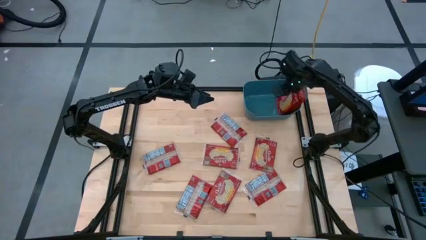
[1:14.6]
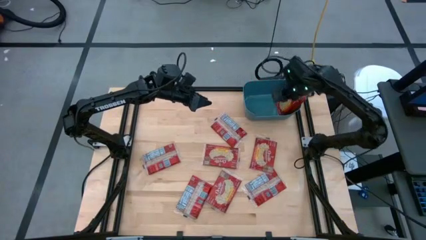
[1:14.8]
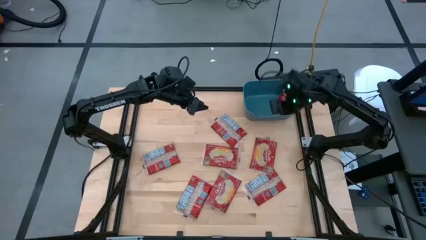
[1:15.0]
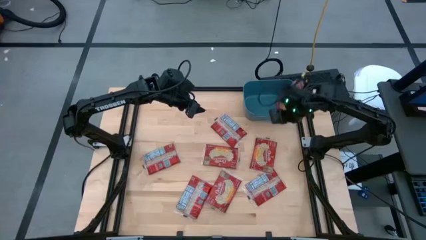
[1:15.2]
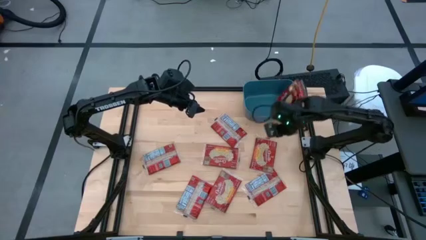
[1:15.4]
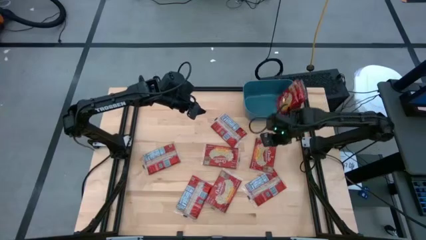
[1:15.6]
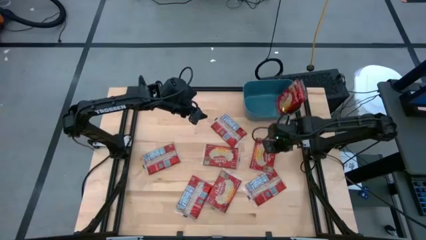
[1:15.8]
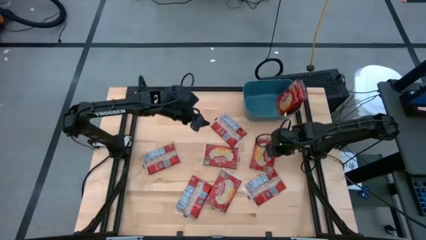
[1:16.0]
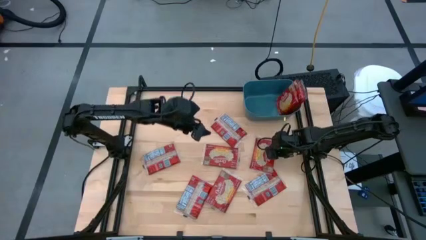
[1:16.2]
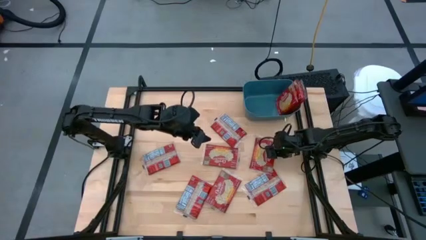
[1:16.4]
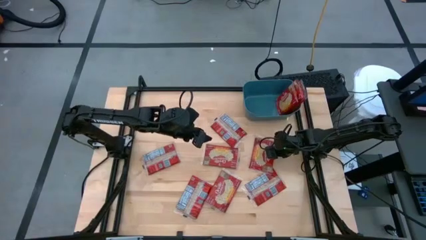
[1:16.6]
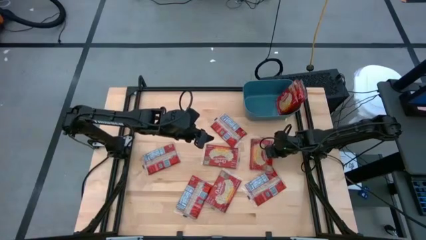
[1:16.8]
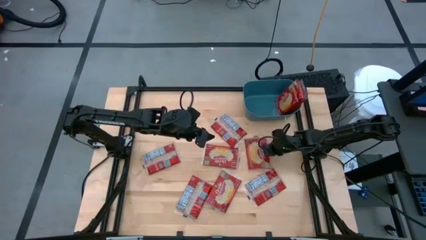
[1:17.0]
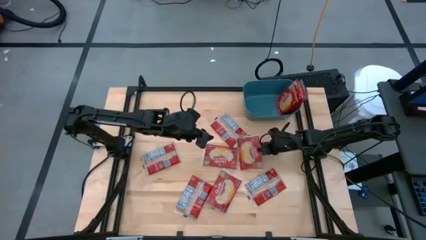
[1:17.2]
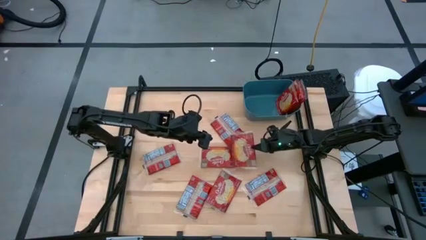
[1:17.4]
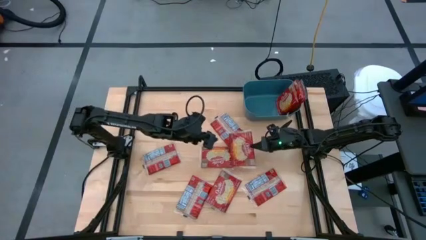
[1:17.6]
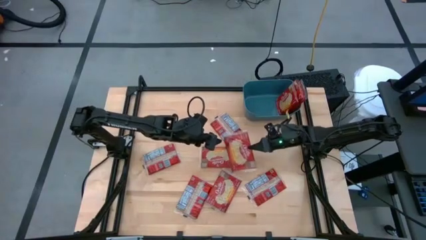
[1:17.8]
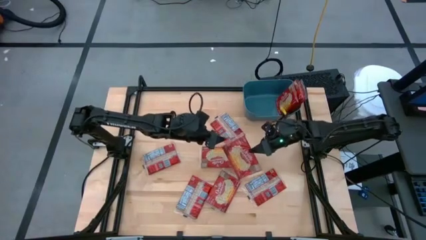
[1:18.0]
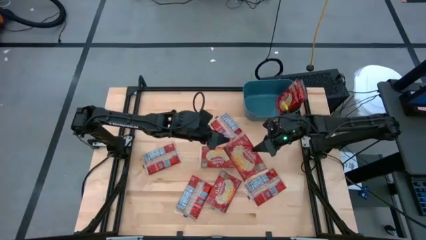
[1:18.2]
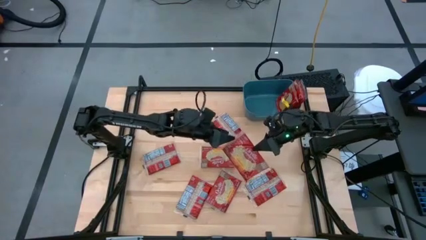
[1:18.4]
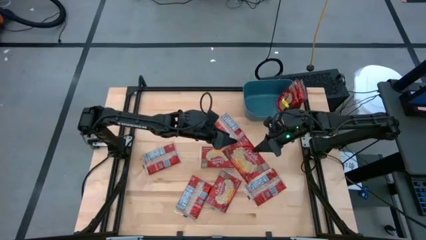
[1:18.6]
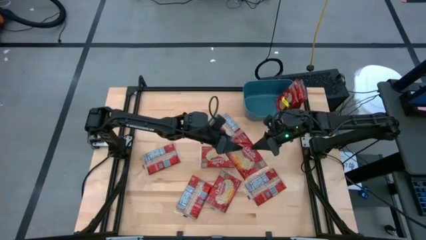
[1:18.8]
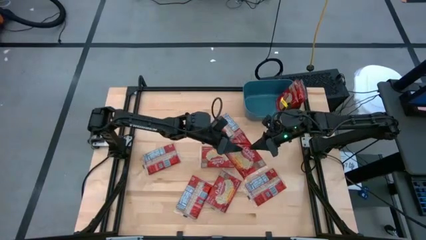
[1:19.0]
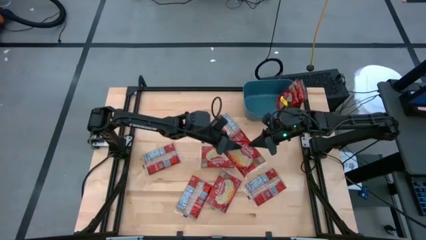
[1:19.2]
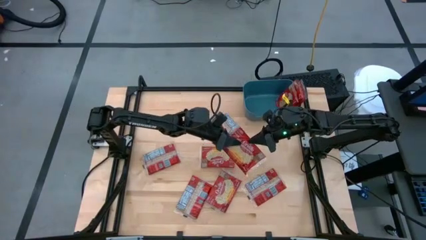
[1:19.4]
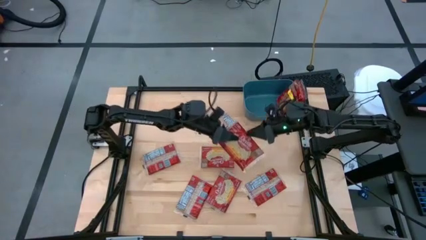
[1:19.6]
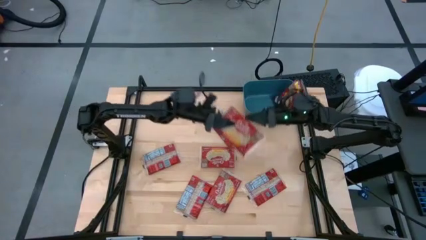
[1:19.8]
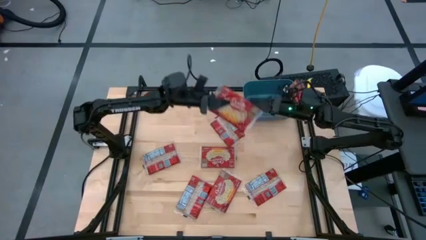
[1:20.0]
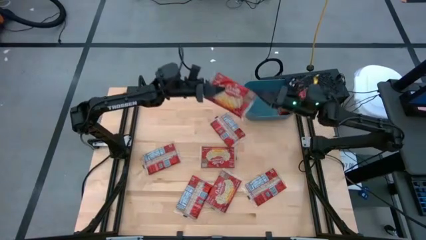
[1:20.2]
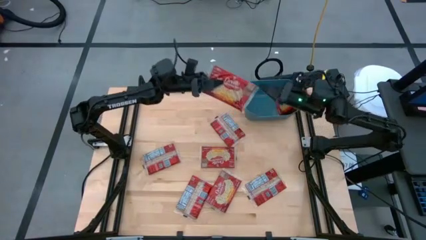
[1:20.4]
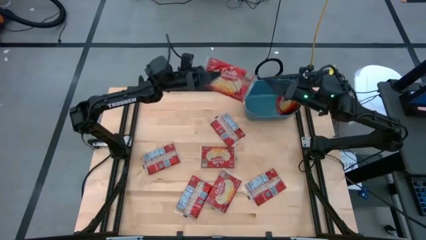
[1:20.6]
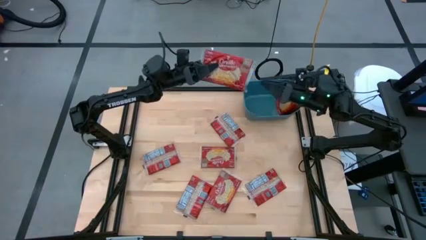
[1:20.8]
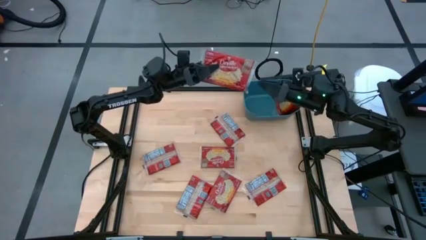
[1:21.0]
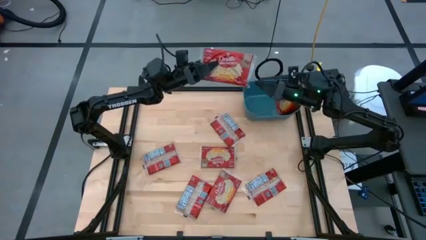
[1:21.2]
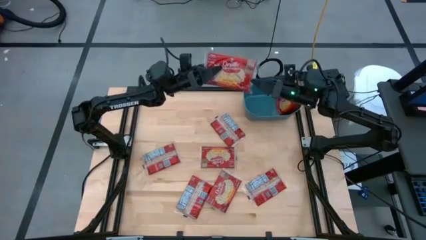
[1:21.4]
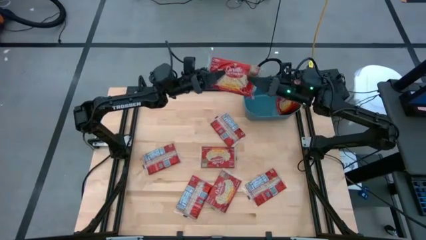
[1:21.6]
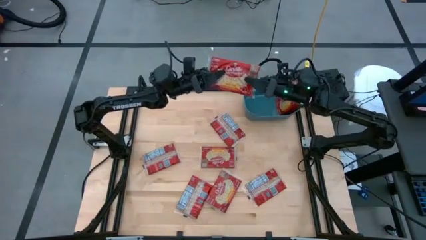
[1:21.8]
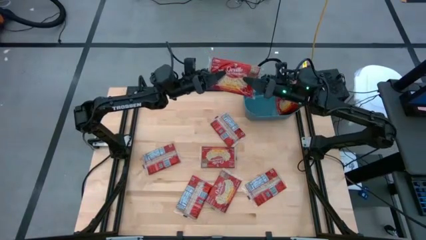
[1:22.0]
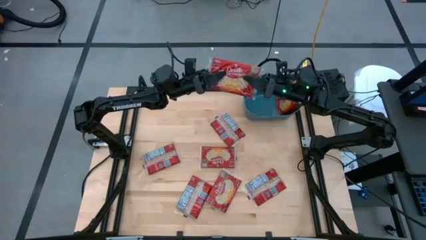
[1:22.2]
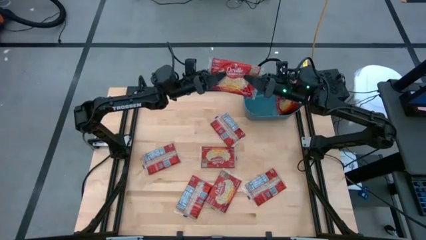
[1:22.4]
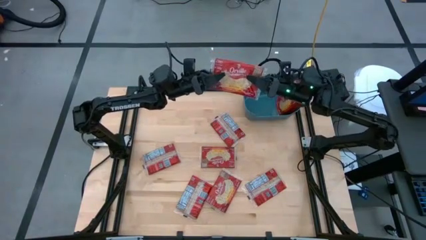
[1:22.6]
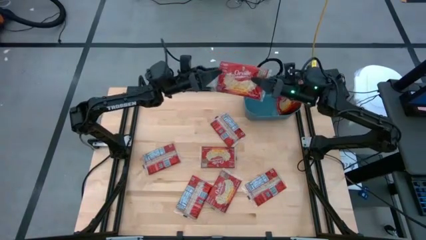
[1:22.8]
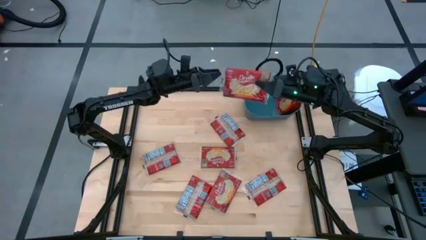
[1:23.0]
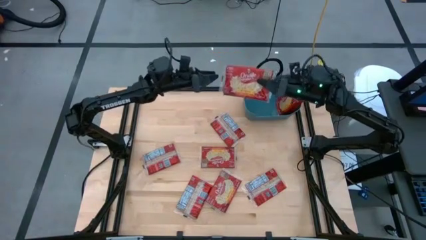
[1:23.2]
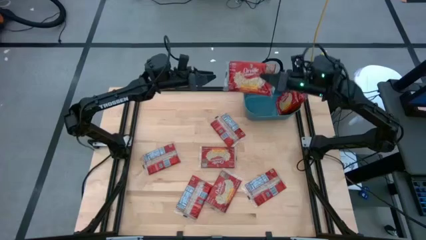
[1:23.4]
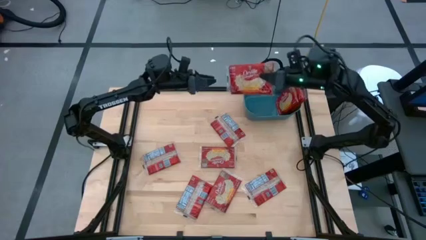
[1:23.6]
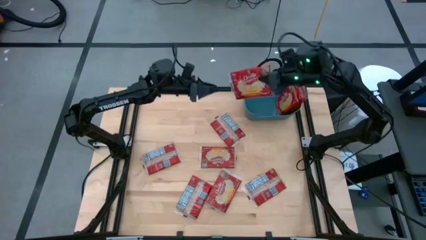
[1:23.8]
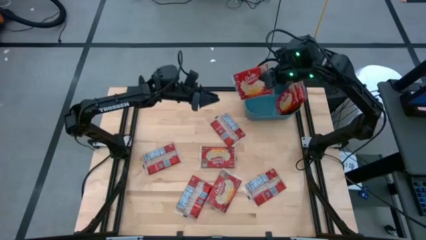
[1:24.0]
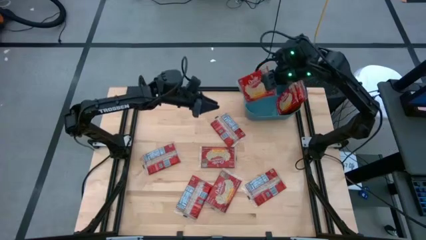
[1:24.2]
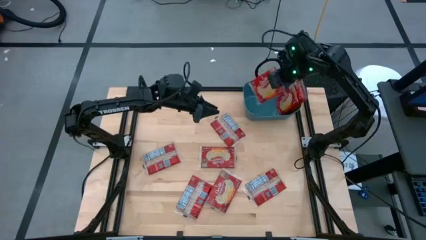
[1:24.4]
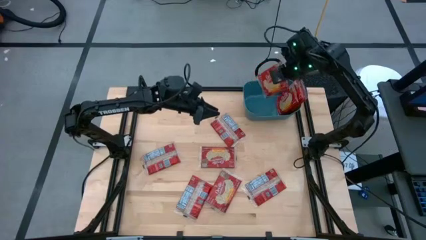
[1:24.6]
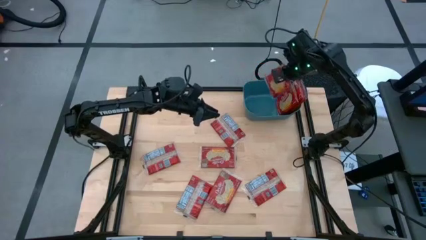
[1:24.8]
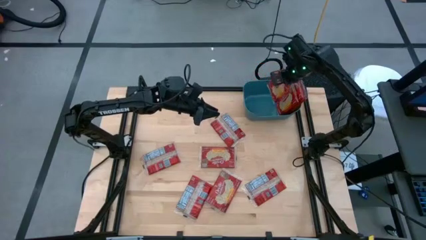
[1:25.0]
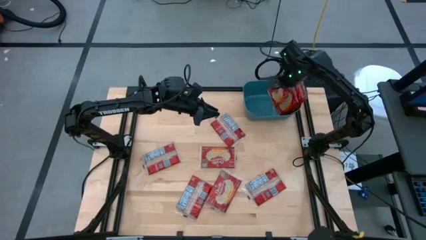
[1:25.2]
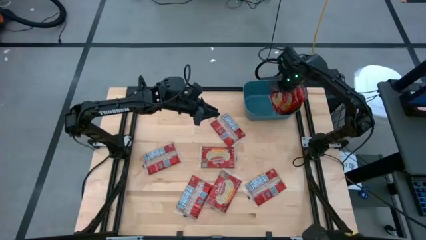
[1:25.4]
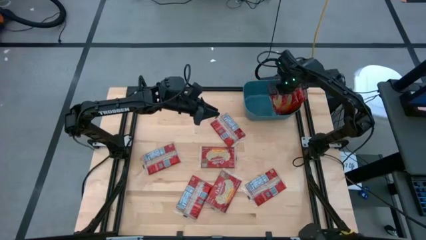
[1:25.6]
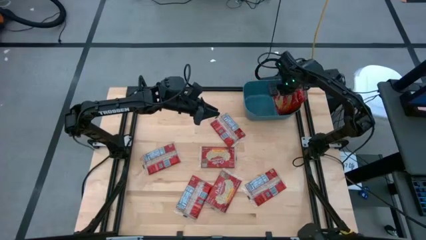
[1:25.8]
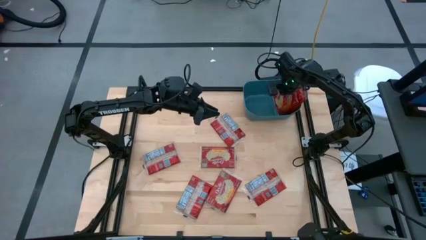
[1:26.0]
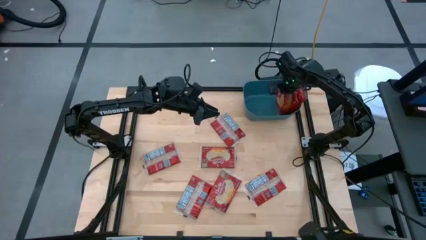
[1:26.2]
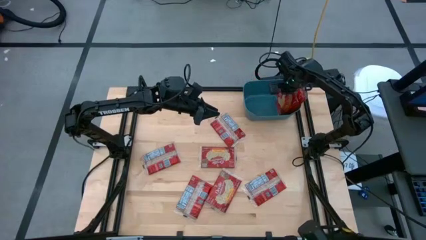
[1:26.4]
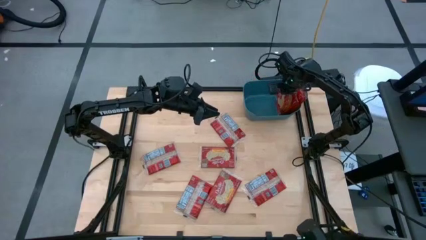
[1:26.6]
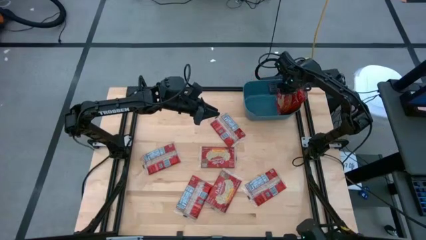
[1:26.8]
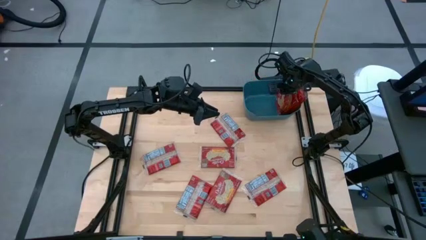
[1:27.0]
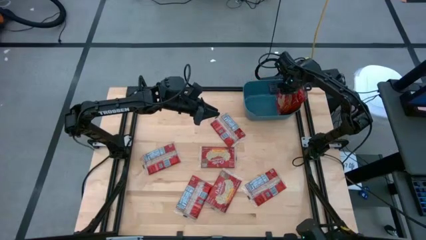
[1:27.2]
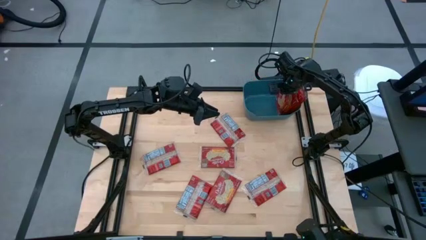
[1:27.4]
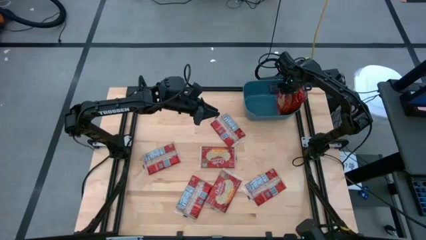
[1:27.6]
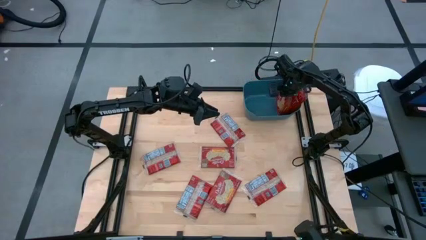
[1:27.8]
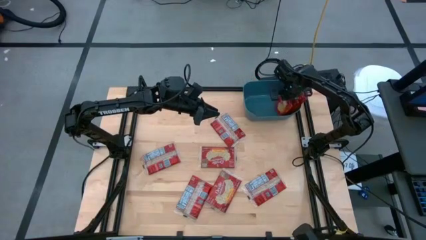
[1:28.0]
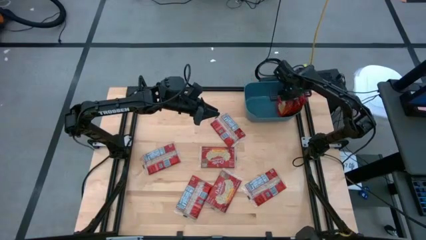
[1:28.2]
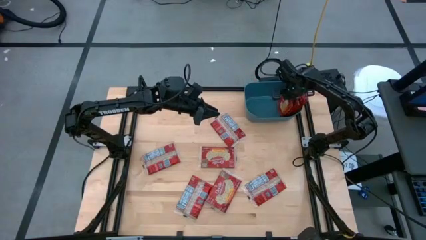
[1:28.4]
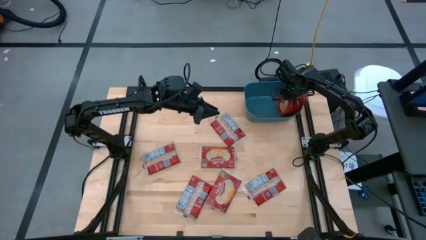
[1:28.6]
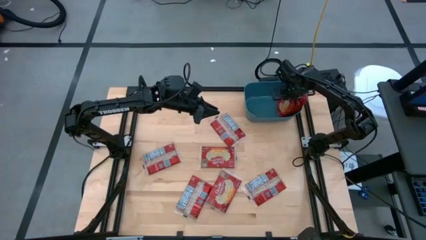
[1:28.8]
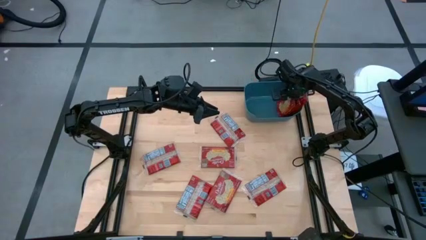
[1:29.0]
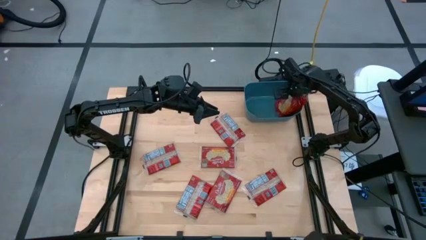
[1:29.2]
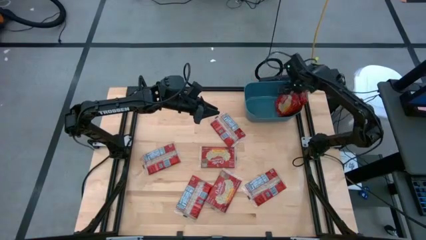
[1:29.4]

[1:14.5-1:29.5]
Task: Sort popcorn bags into baskets
Put the popcorn bag into the blue bin
